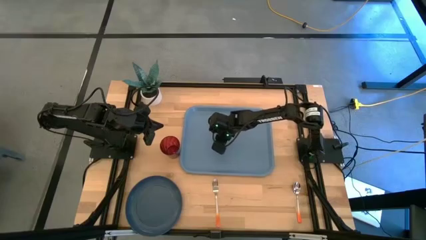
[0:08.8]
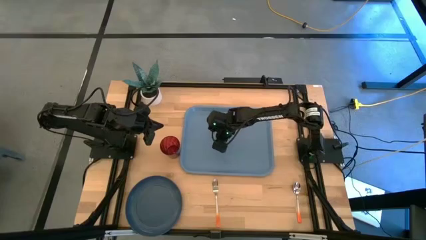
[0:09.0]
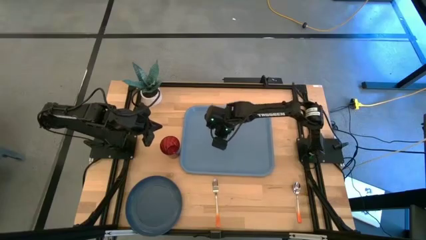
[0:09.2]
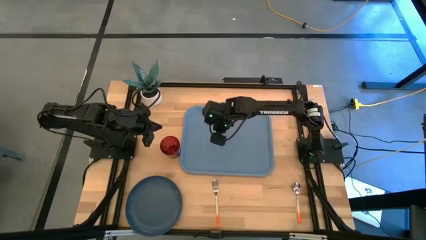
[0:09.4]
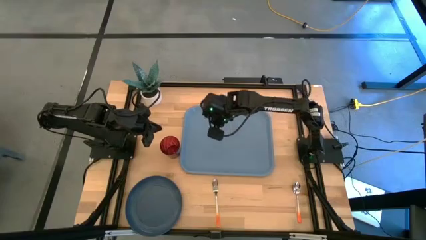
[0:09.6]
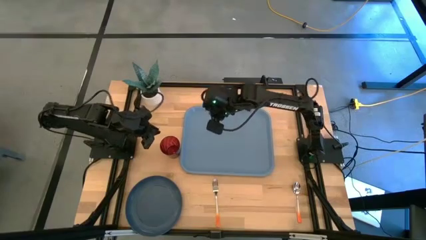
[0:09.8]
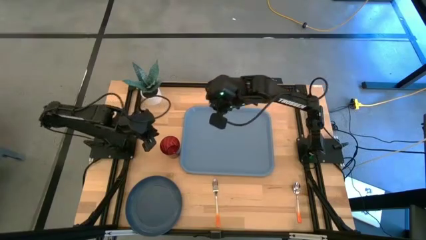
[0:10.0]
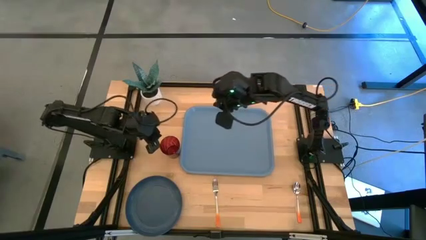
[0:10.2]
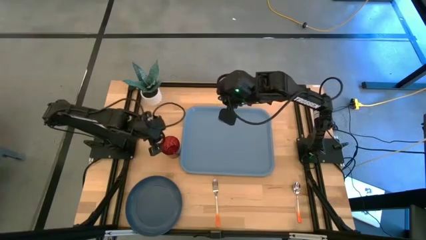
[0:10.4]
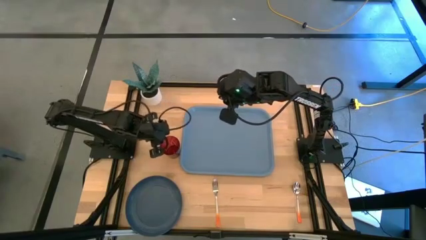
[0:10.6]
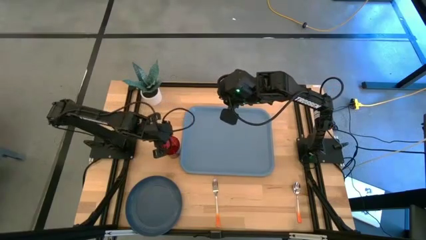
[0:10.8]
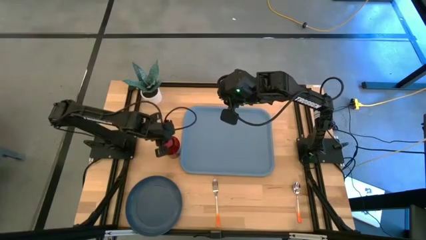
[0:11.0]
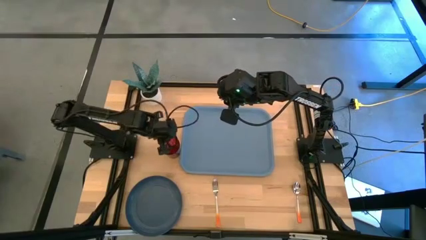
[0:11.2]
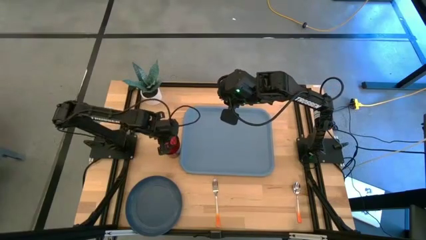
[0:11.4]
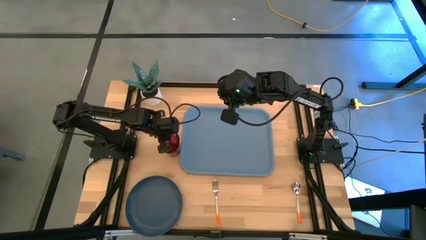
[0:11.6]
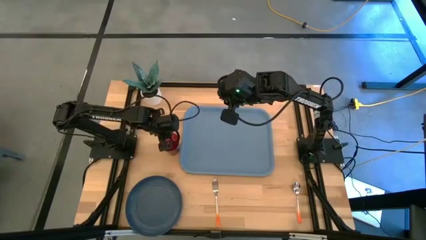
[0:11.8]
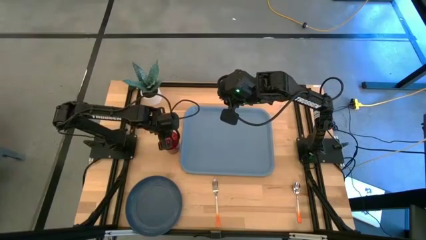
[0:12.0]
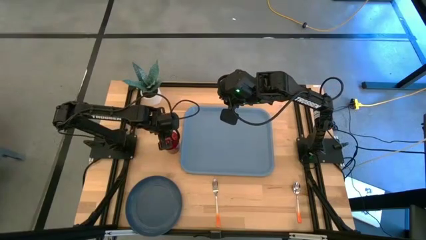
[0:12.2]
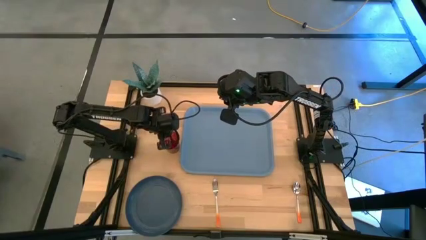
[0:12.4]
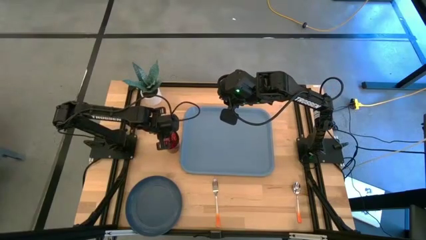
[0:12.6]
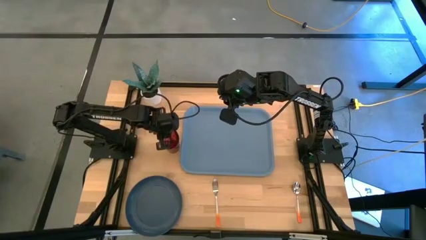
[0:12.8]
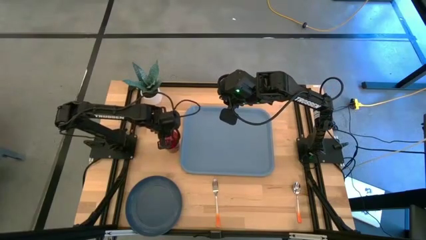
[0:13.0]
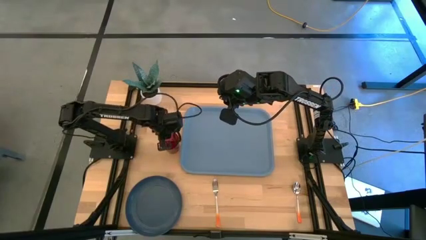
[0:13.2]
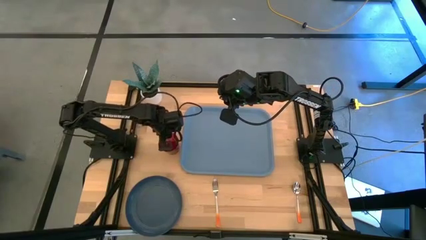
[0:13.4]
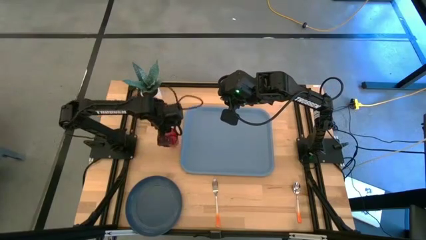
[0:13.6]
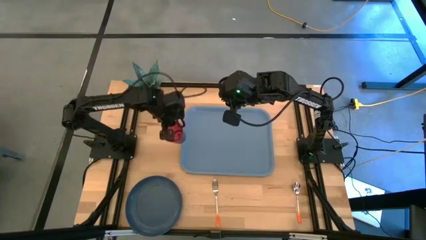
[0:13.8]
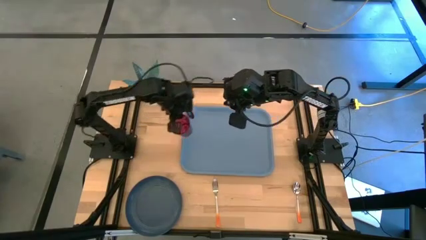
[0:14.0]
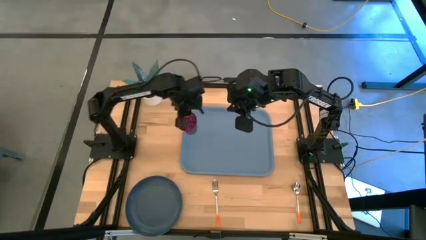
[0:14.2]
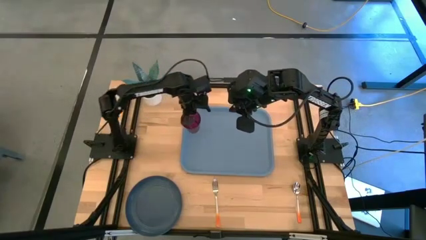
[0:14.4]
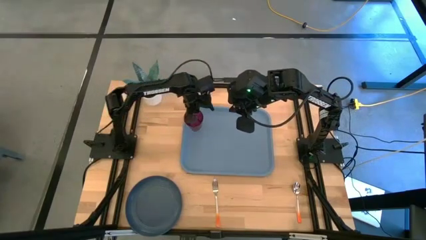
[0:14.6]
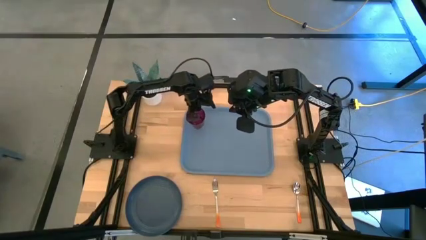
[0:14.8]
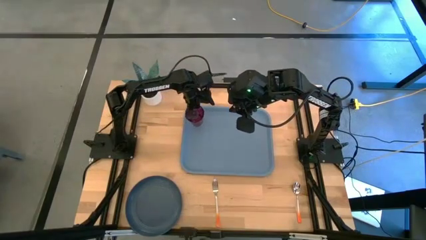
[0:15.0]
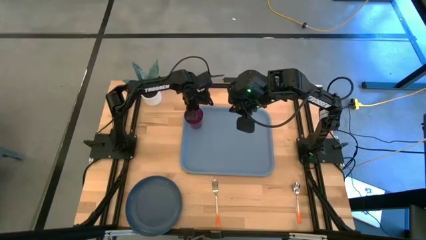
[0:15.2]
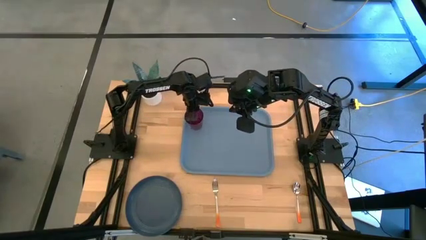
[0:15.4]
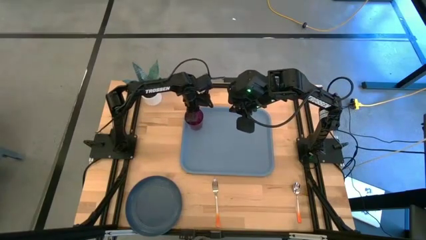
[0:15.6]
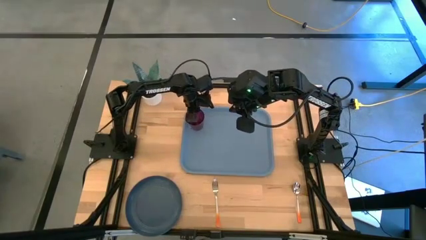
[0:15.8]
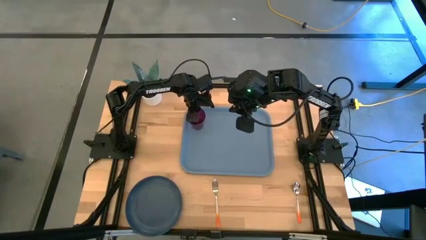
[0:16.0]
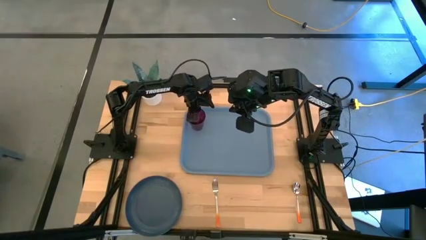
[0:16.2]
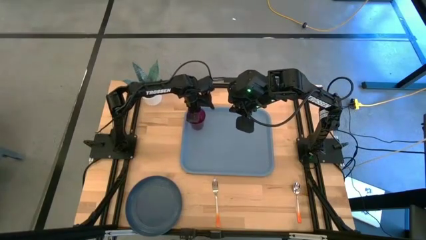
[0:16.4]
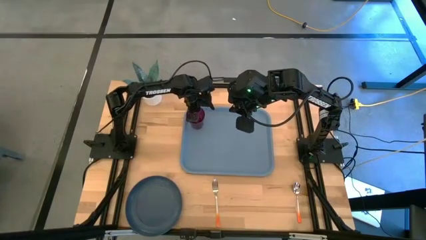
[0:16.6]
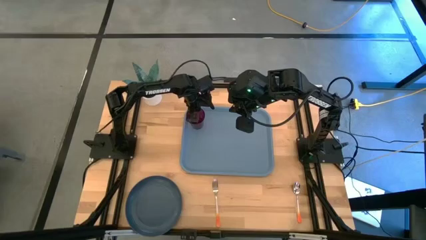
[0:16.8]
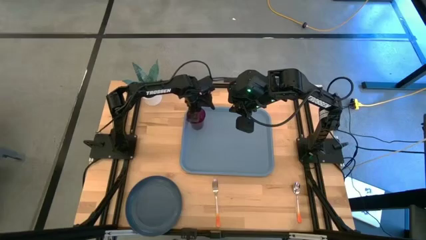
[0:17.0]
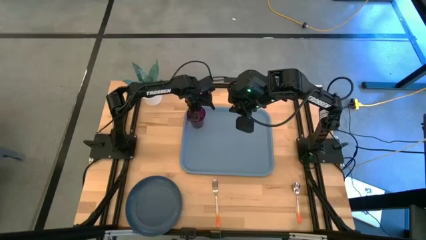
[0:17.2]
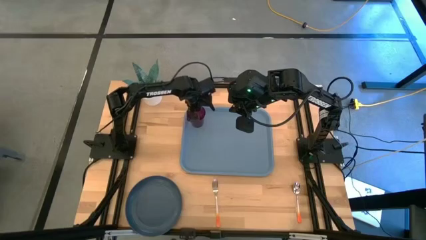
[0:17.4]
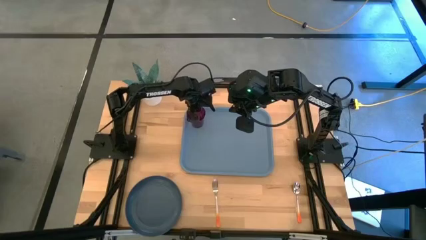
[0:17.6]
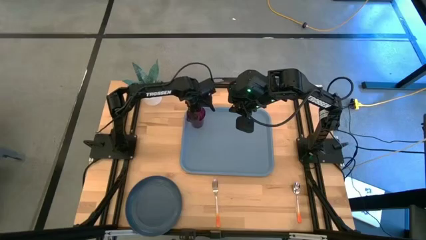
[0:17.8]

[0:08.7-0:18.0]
Task: Pick and place plate/cup/fork/spoon on tray
Put the red glass in the top left corner of the light blue tray

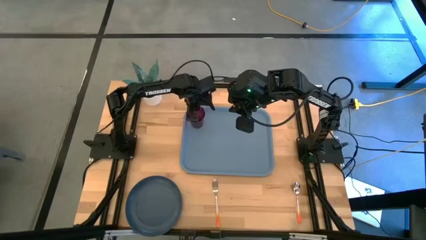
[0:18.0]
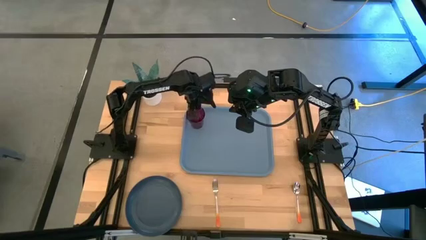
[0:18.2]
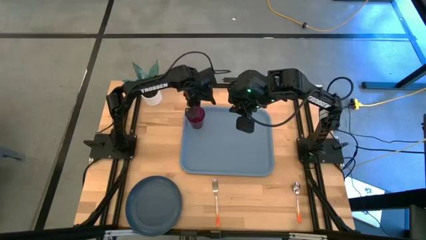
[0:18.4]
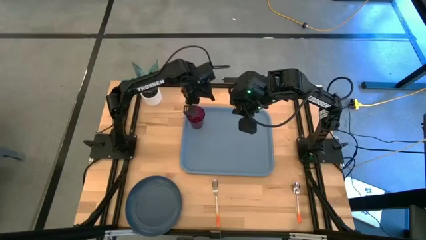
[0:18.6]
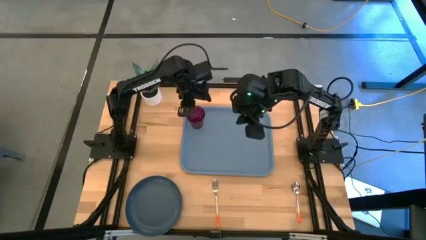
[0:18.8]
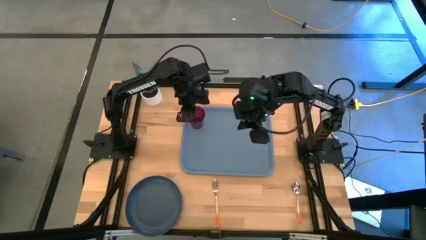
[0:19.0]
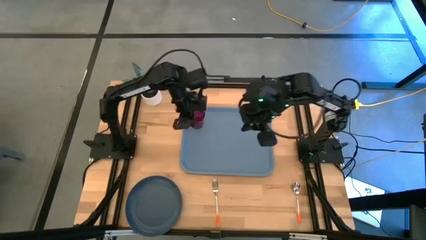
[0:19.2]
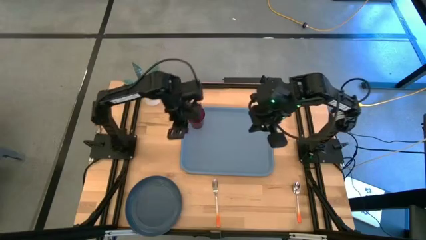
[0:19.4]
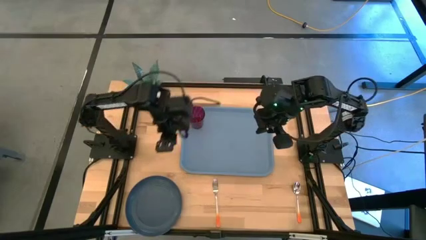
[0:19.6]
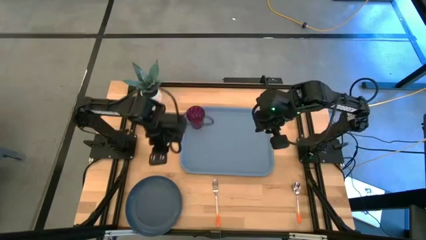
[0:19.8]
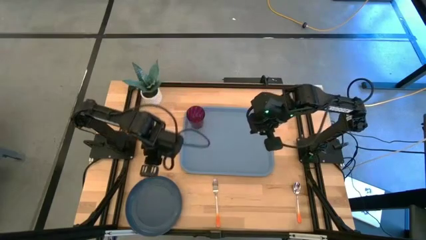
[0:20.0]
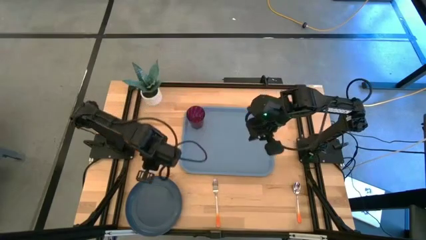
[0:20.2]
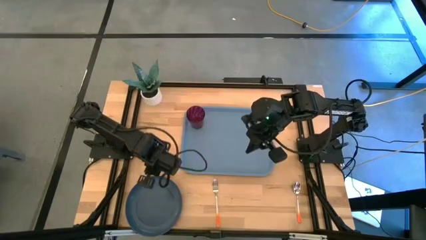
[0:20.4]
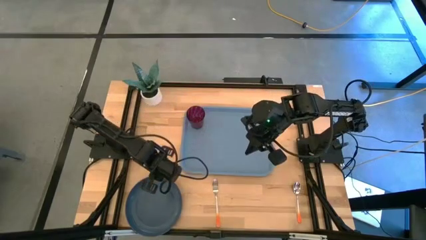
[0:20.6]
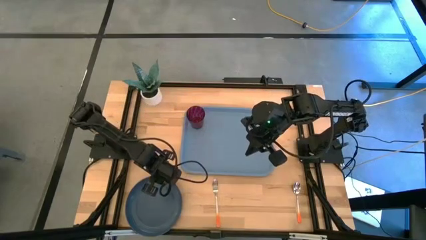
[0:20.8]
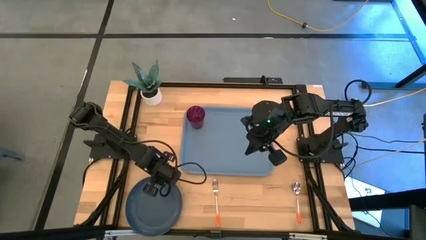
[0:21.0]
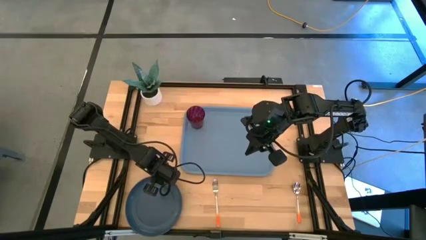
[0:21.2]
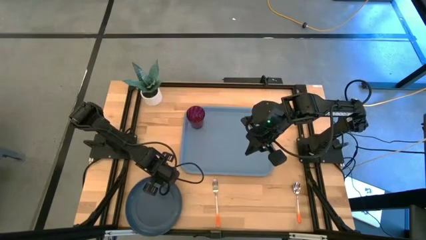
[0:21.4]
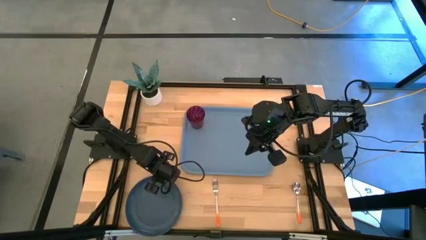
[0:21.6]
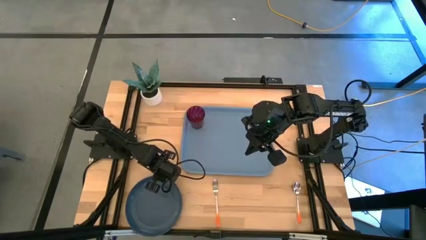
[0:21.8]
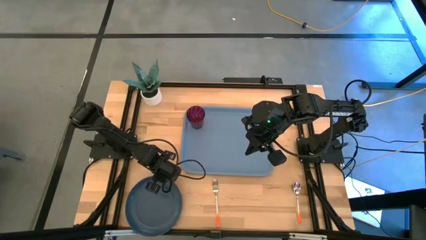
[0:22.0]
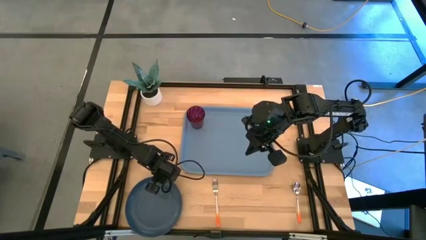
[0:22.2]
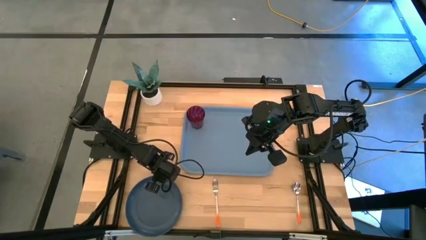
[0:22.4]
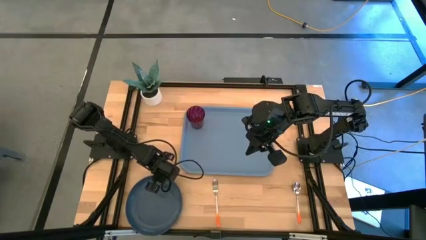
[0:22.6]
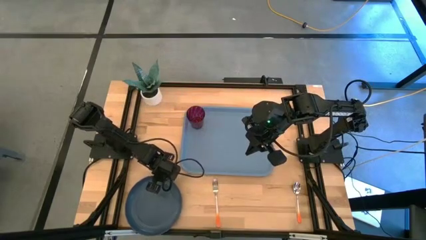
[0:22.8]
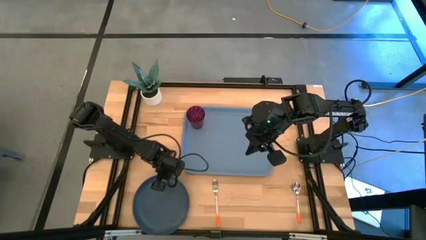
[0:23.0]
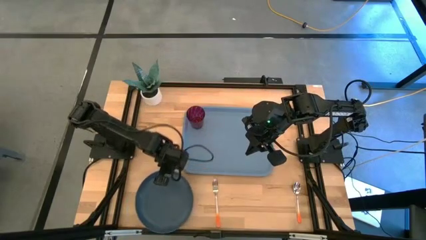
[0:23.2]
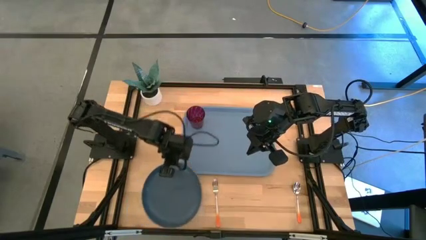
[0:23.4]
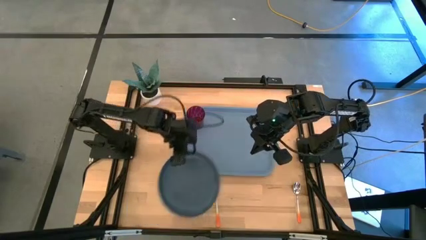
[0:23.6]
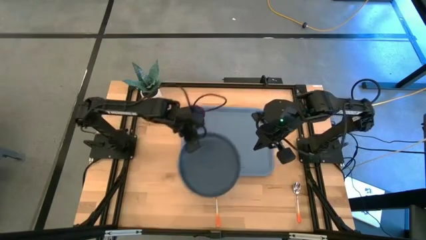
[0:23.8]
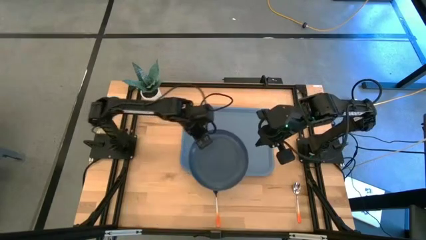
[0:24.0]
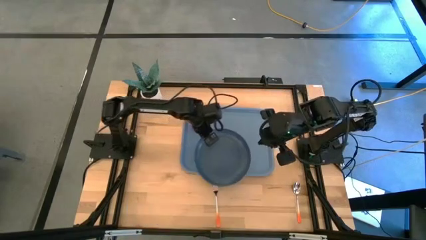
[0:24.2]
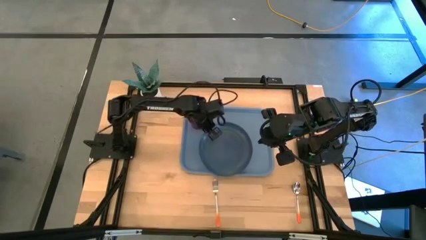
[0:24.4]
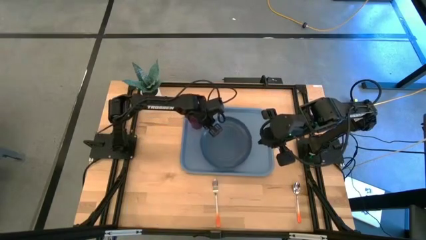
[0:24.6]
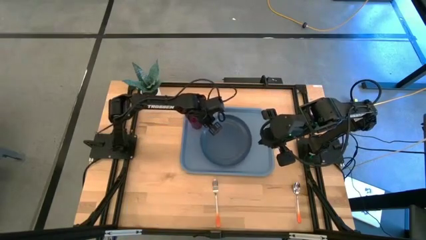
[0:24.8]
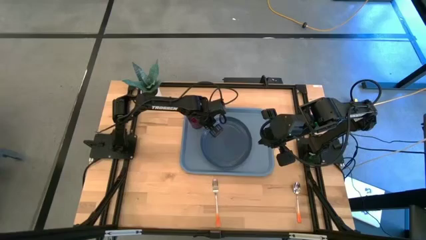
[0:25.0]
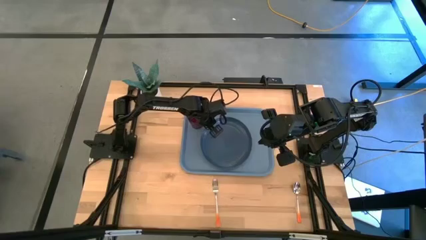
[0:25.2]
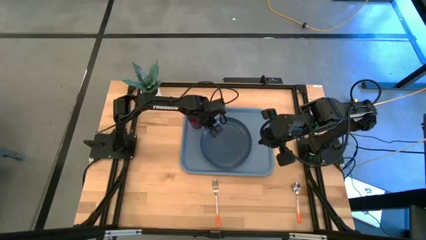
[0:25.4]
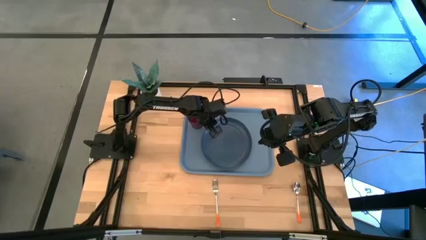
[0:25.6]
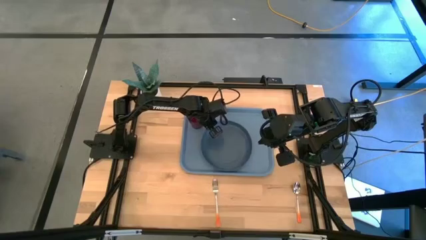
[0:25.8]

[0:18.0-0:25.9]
Put the gray plate at the center of the light blue tray
